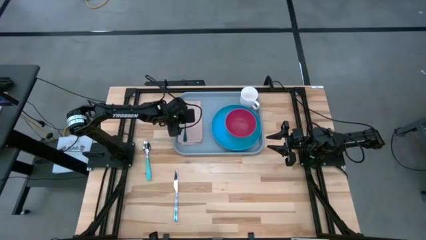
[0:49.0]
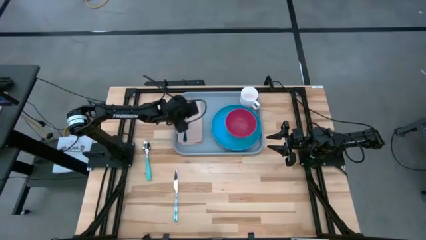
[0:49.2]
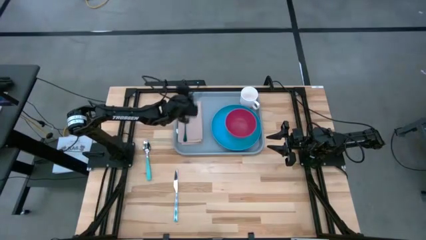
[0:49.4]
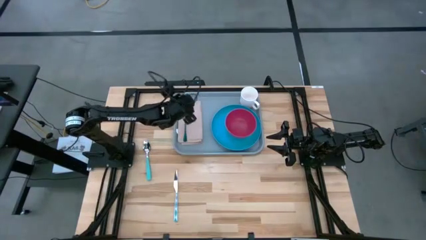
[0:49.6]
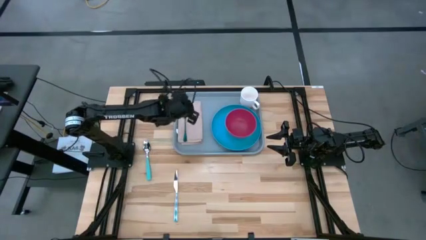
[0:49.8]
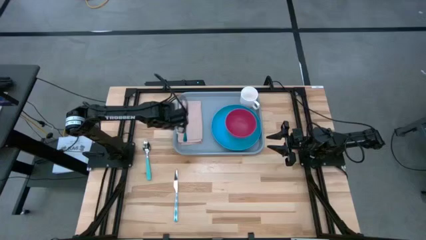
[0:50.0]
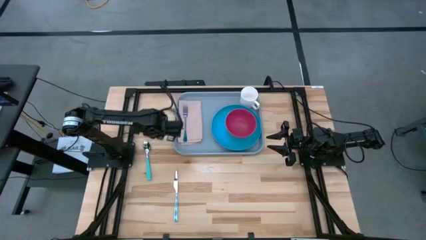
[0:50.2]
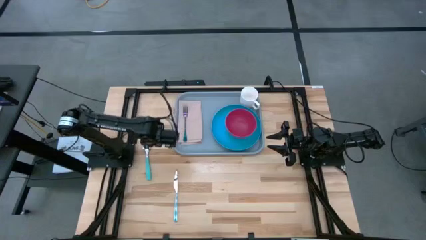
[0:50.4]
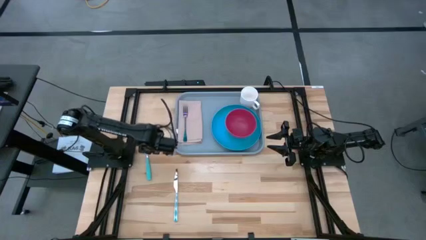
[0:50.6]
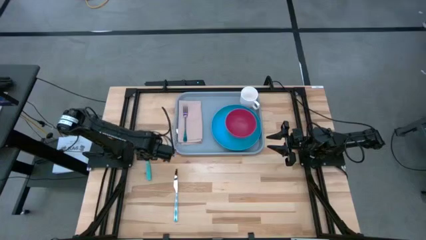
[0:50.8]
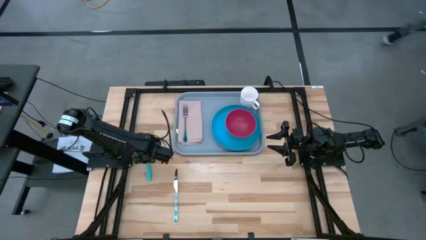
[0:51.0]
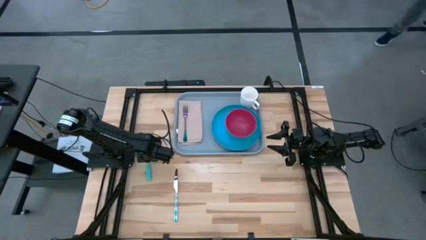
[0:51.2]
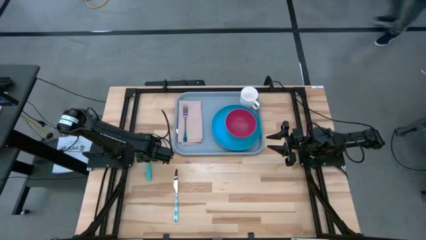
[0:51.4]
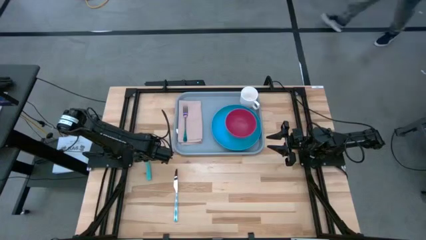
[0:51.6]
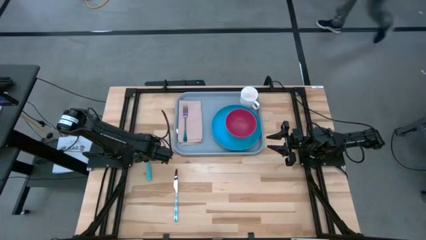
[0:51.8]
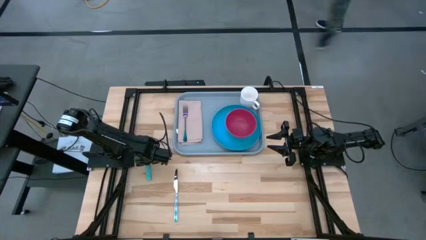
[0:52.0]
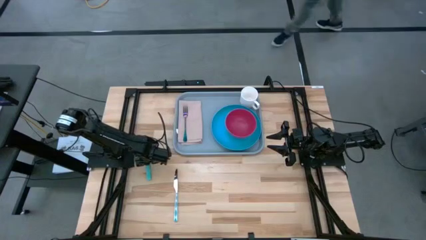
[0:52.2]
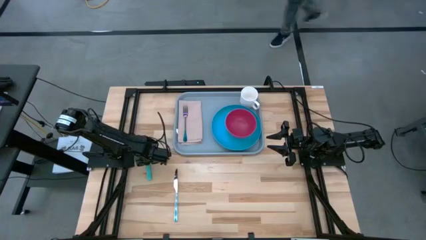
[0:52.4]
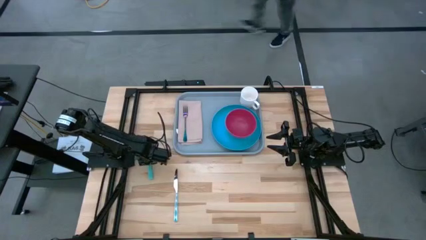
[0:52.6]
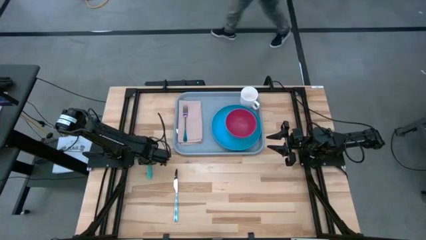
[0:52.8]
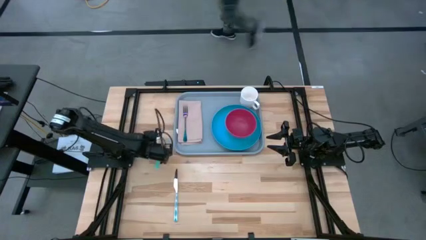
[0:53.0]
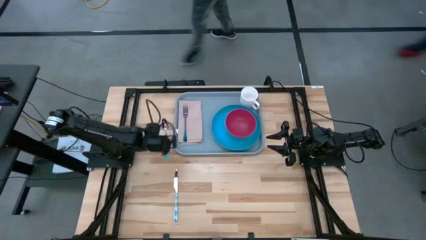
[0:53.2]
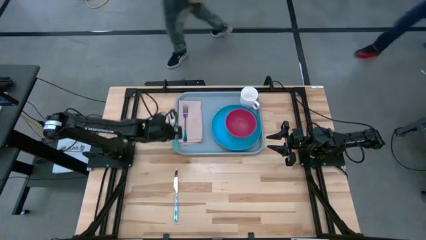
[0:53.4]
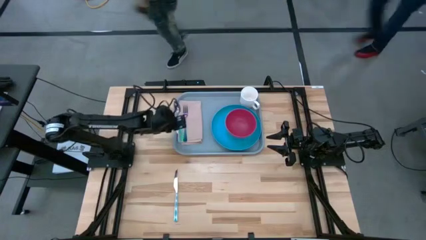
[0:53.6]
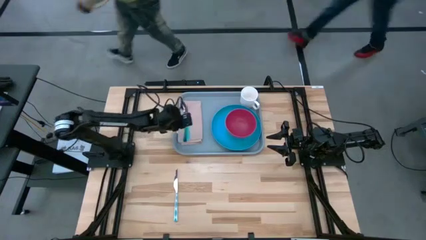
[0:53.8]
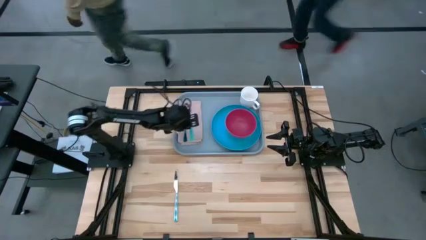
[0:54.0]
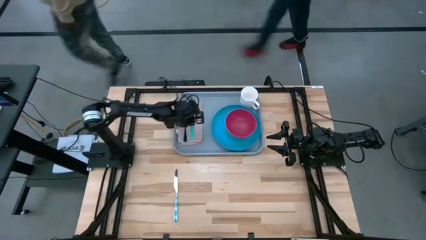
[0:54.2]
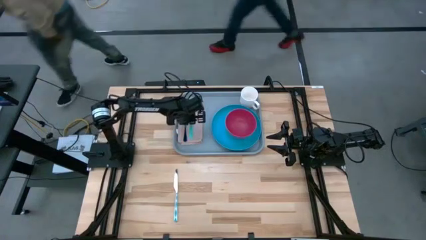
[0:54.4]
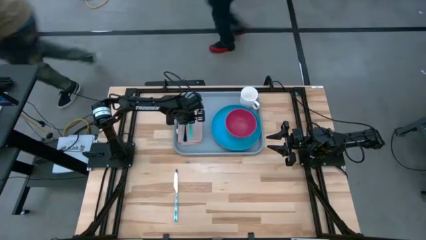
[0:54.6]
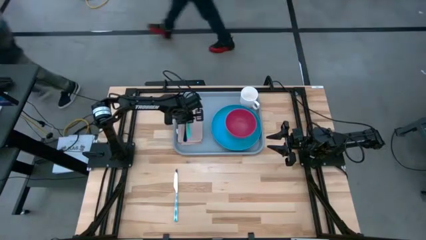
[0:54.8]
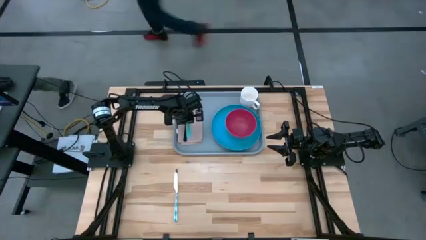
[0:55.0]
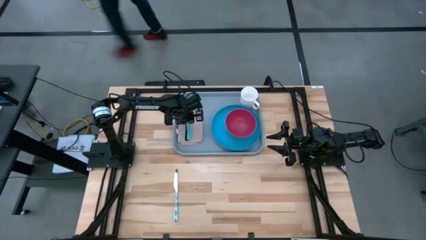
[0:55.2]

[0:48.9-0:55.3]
Task: Set up tray
Put the light blue spoon to the right of the blue fork on the pink napkin on the gray serving tray

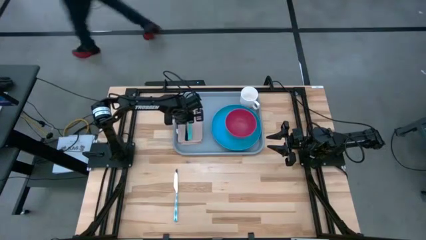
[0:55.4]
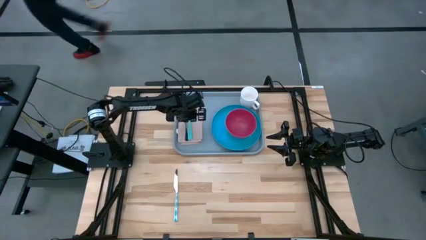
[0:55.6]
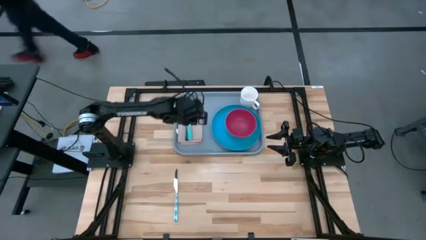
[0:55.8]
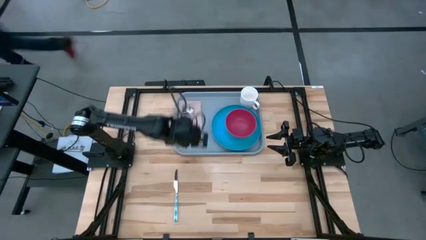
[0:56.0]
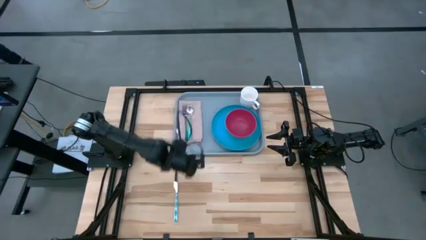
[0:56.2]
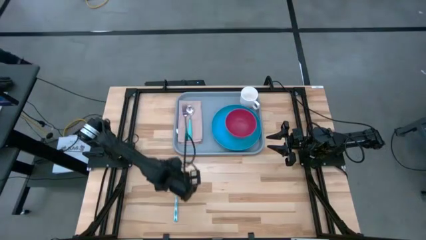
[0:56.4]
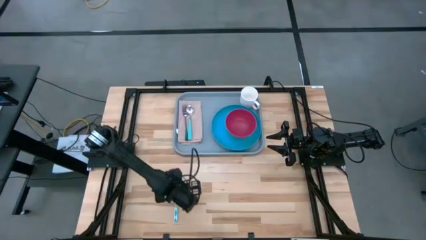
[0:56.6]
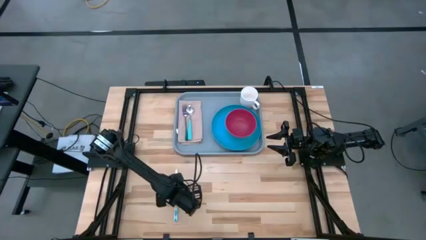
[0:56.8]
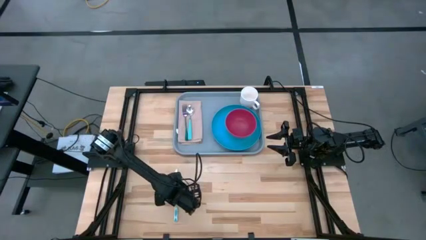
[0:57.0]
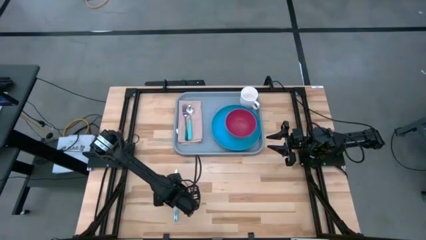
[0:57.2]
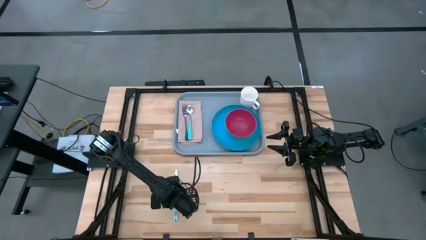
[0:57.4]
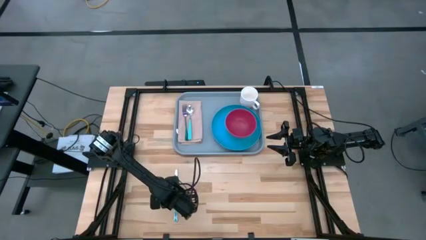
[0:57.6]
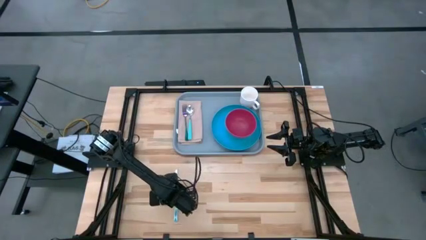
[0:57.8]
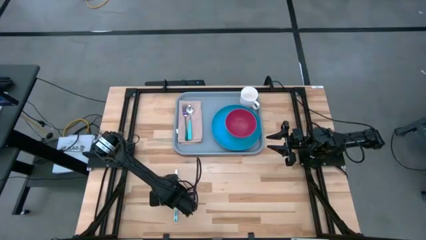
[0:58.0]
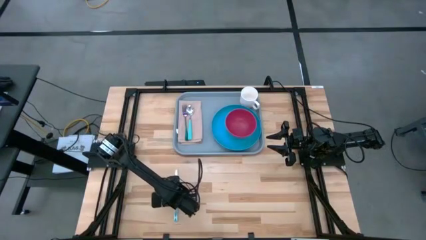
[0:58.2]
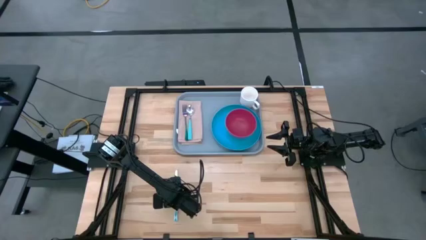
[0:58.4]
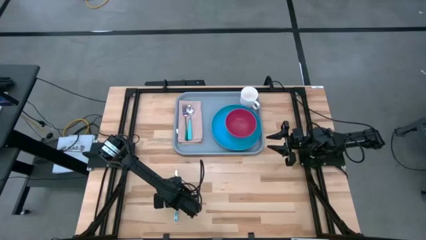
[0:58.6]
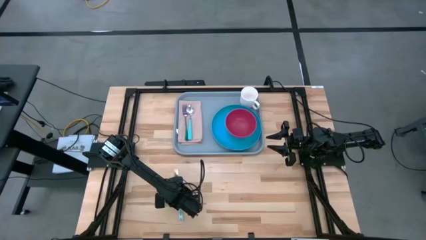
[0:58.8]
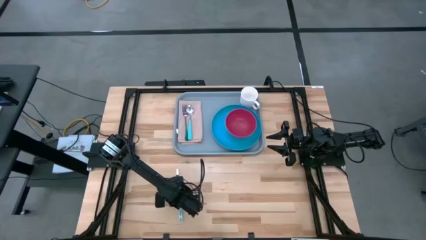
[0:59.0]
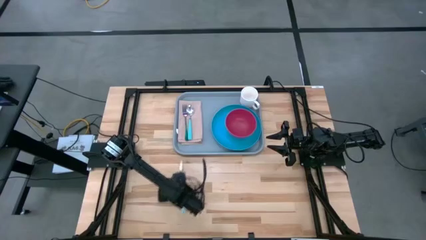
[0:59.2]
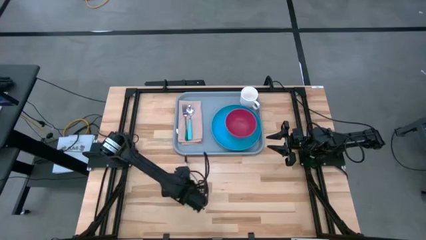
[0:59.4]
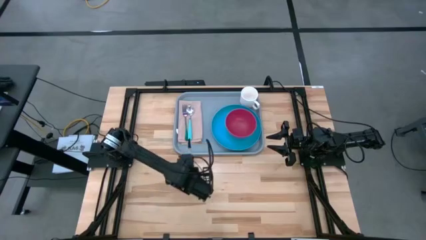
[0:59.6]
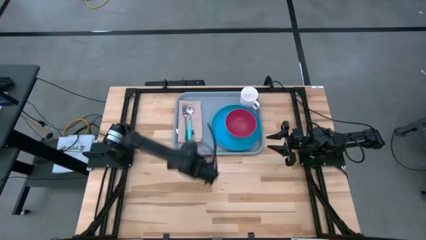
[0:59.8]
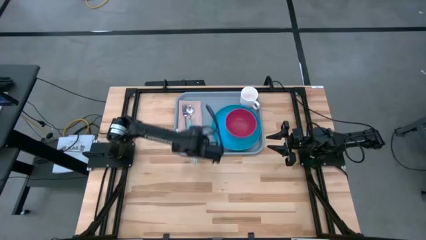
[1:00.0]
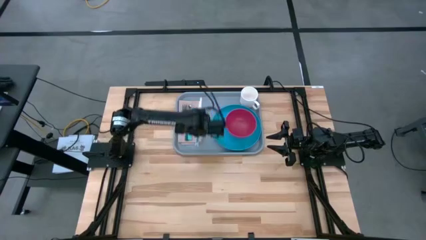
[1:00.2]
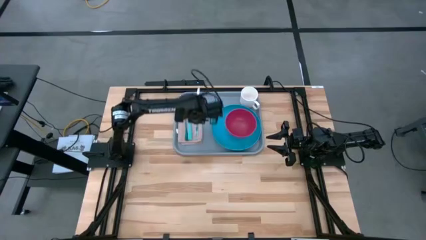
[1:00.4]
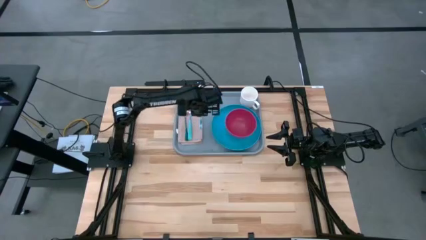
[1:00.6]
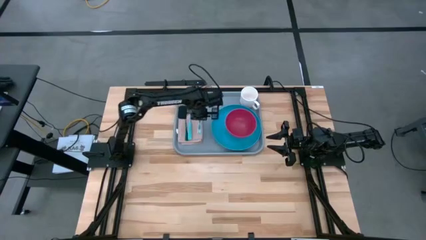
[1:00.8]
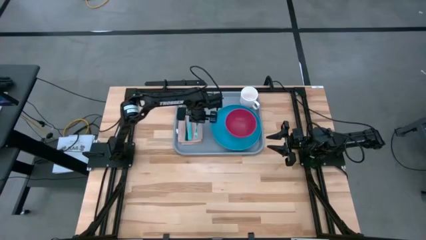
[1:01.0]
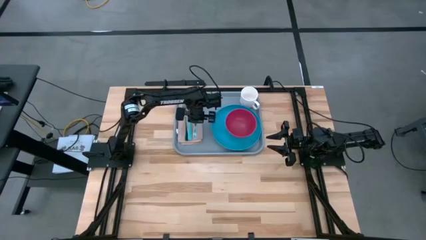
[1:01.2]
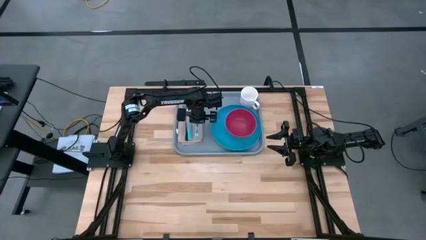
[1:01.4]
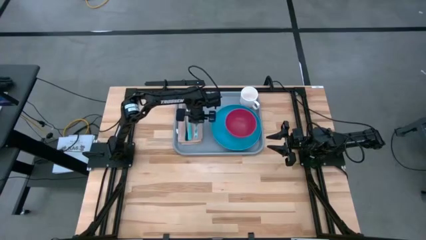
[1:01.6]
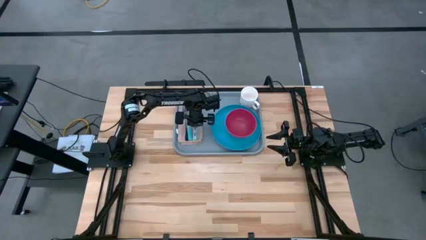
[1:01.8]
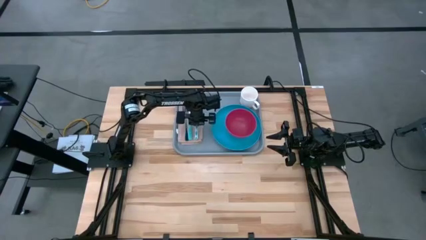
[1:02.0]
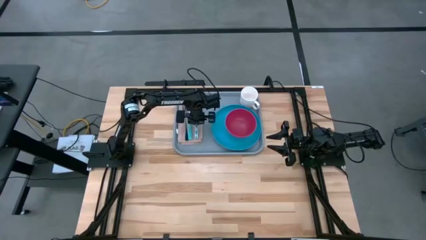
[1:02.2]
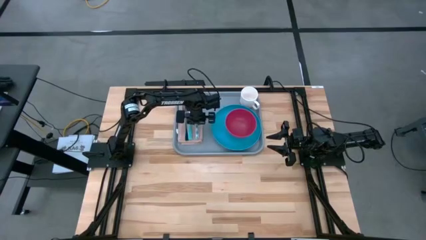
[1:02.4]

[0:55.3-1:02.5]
Put the blue knife to the right of the light blue spoon on the napkin on the gray serving tray
